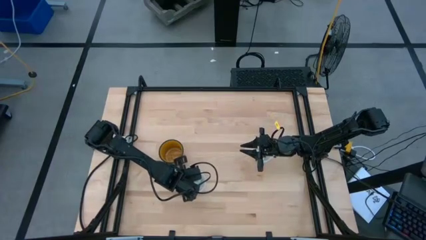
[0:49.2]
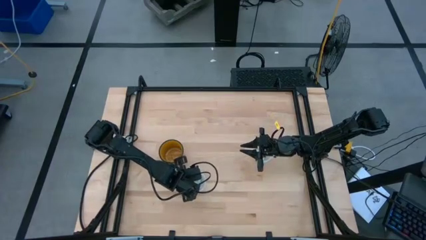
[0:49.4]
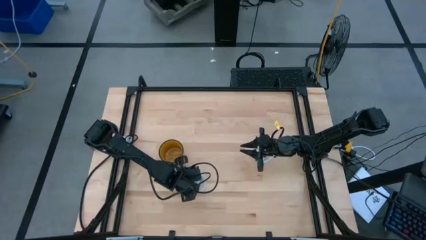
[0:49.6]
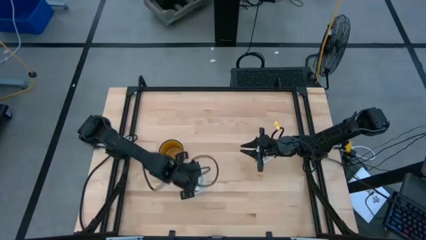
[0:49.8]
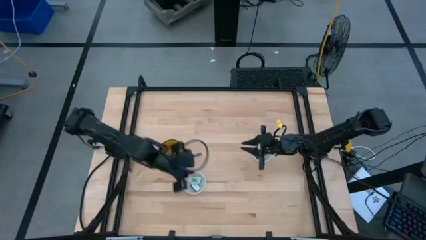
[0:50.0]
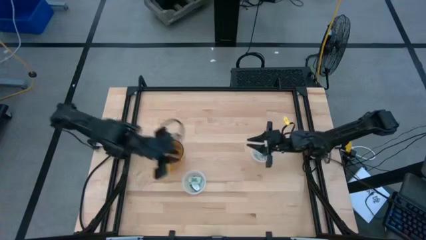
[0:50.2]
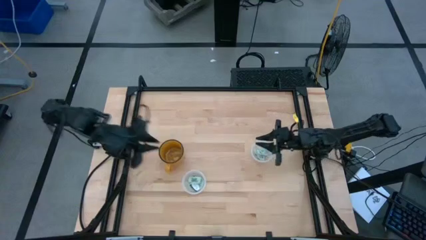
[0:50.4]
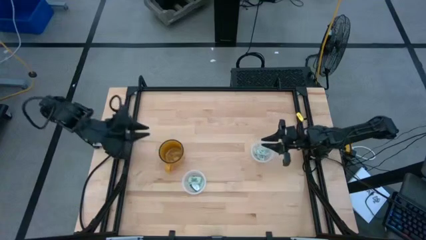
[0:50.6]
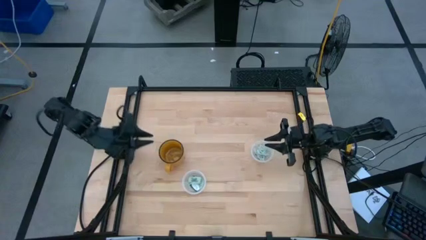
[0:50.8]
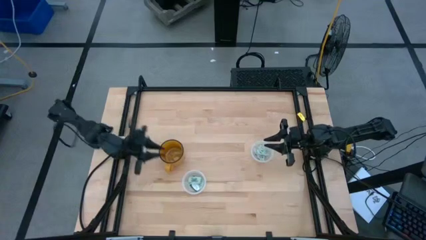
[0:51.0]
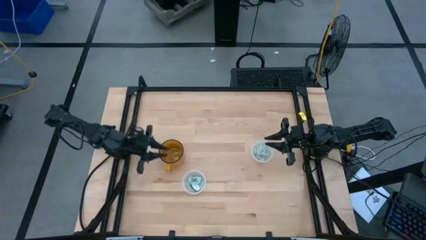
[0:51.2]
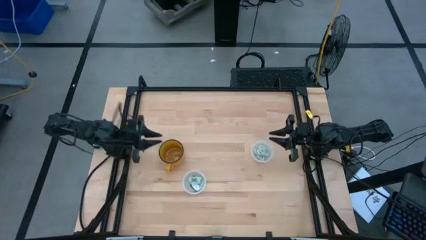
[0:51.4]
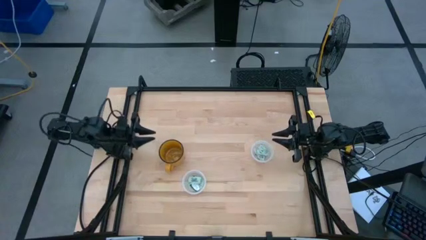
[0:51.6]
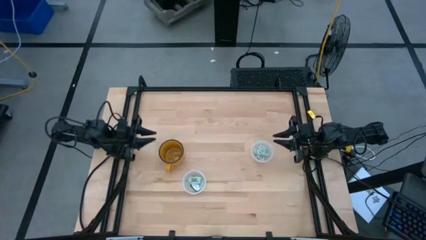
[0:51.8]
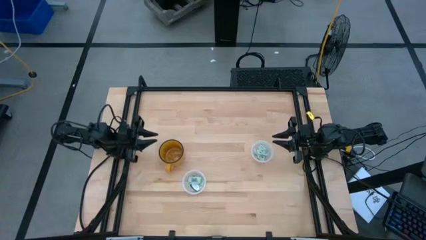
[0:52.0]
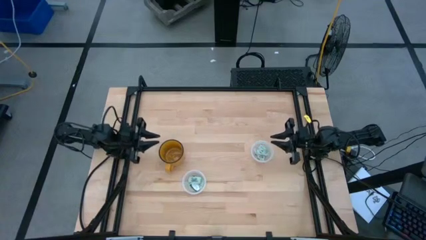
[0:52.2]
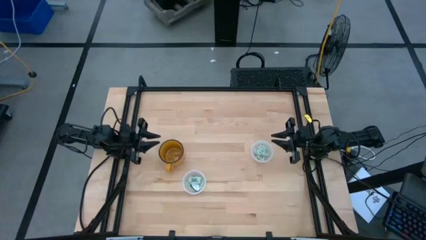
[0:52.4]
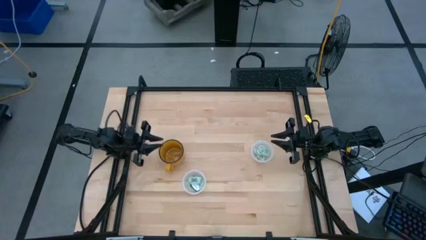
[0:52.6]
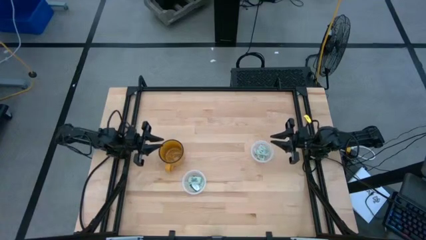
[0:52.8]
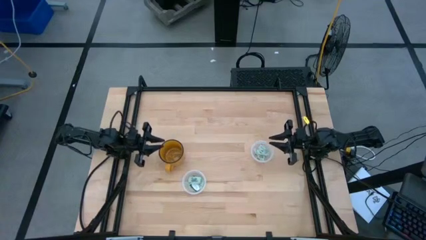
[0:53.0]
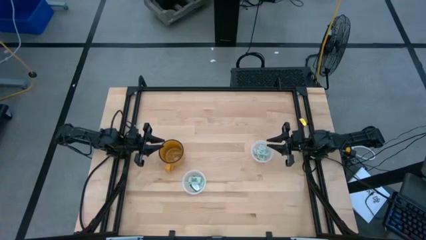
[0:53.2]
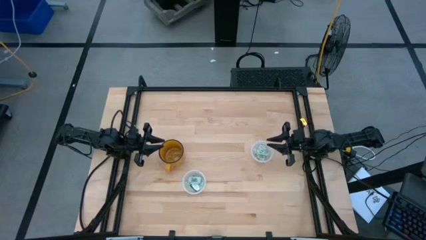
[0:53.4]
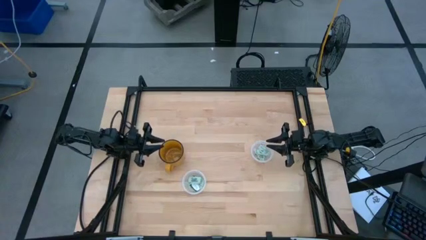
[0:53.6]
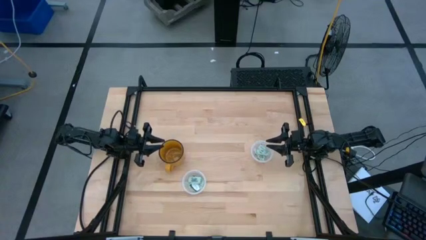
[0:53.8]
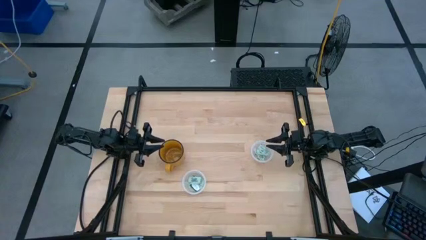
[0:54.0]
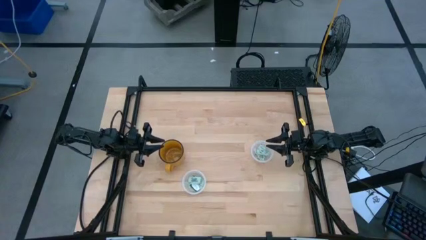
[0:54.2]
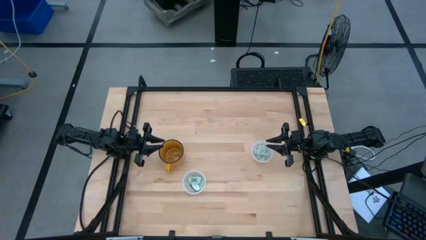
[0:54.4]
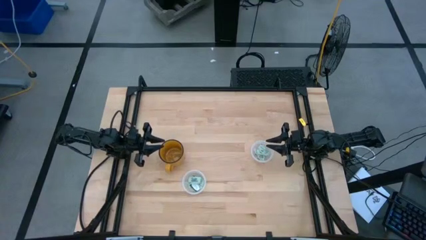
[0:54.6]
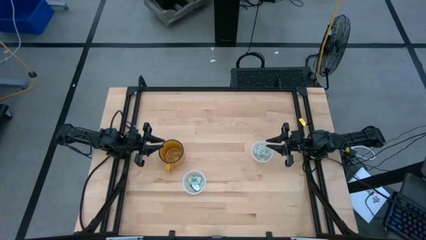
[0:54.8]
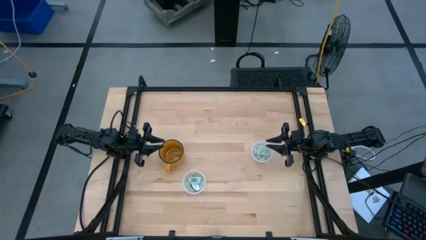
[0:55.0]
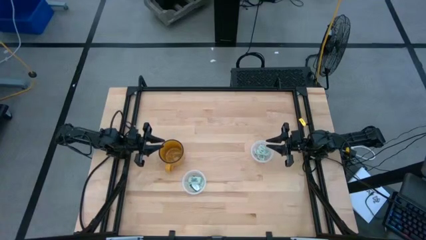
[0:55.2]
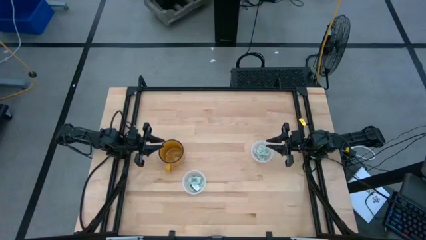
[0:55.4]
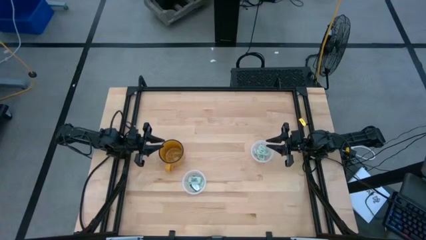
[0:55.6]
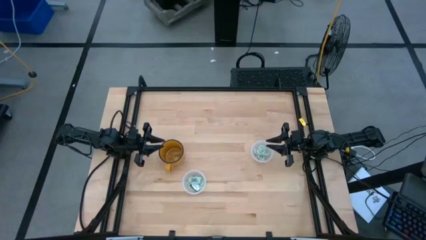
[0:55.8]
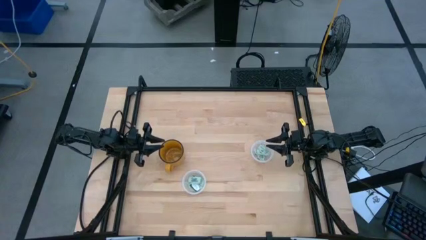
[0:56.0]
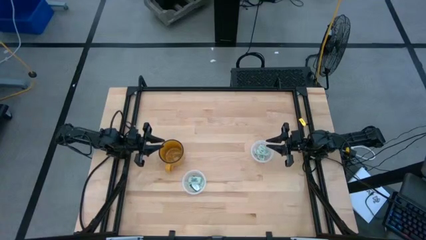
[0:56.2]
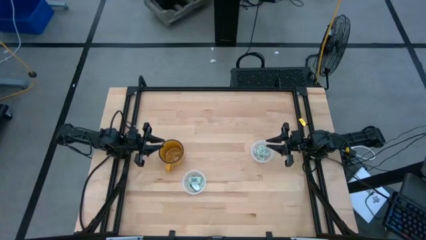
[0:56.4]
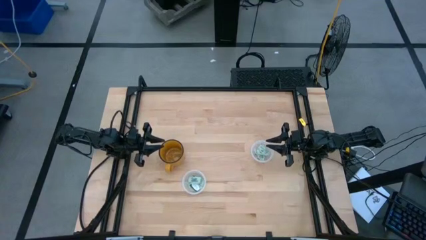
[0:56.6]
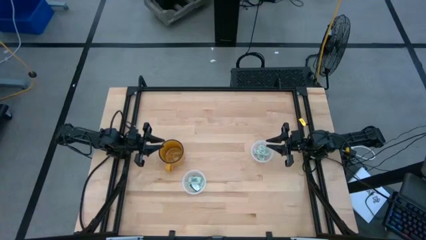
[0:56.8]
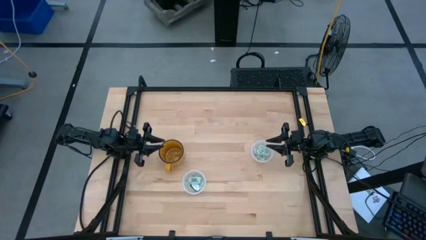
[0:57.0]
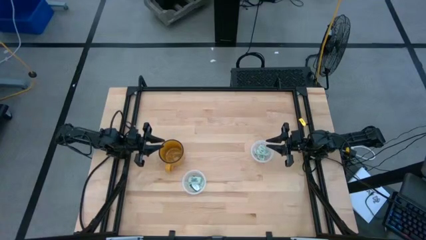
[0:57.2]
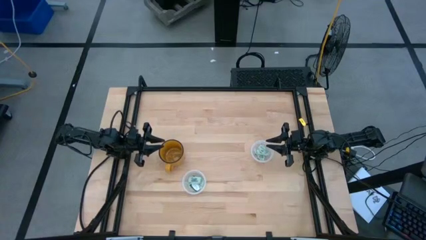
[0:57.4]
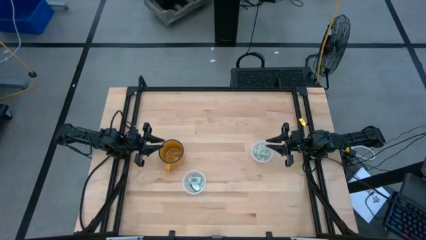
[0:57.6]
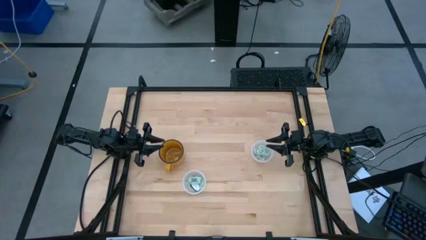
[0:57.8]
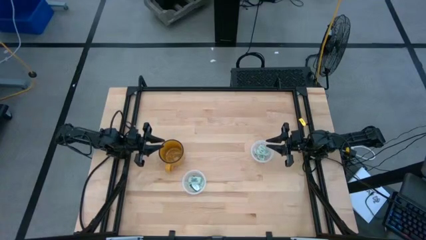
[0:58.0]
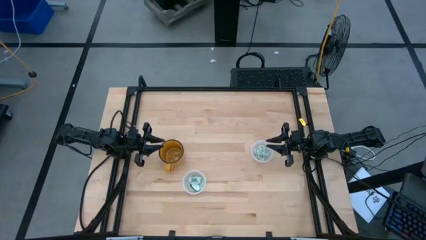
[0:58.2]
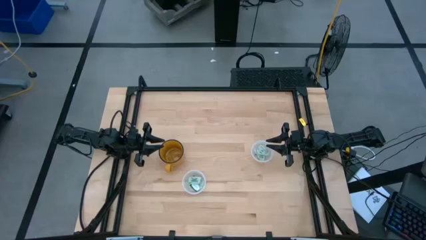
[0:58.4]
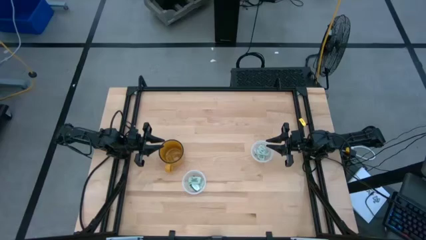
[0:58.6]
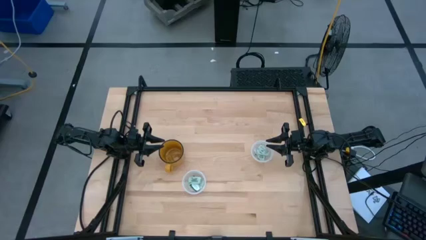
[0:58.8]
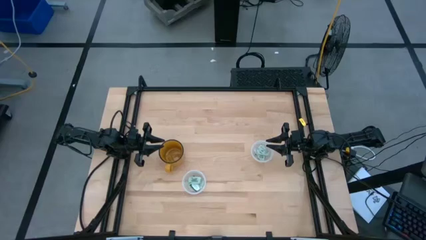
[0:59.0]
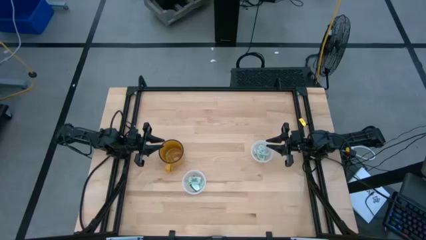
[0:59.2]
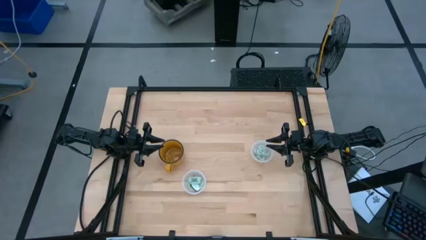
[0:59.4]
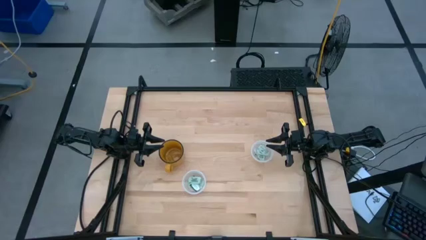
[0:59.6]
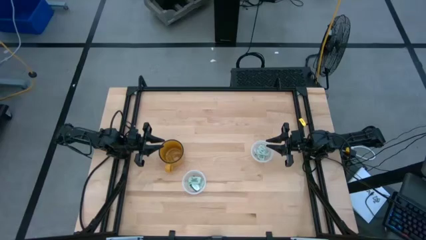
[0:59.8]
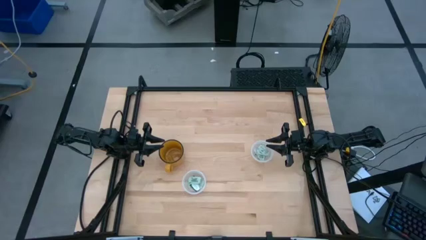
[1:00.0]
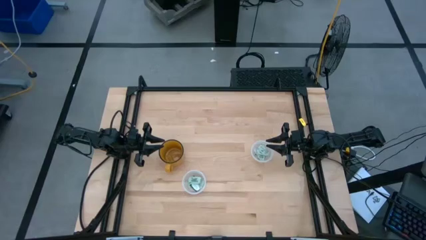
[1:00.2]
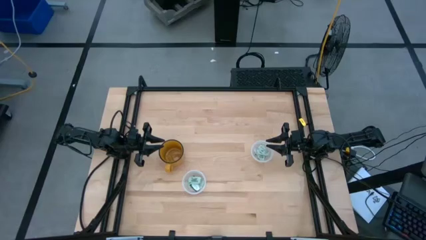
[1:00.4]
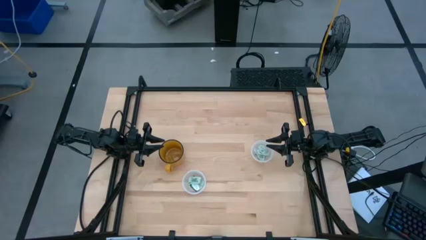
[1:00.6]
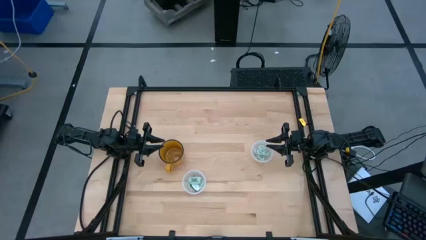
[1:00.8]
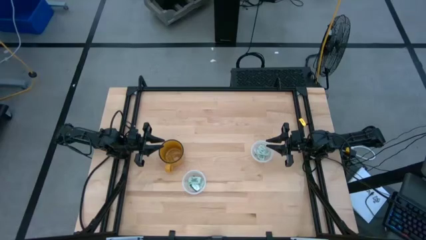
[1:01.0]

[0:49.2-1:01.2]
Task: Pick and place Stevia / Truvia into bins
Return to Home Position
